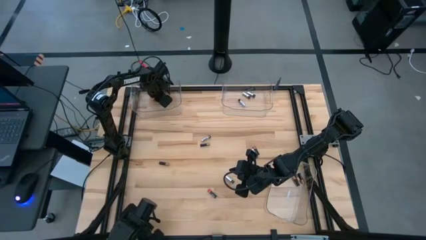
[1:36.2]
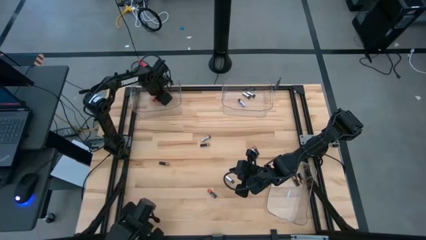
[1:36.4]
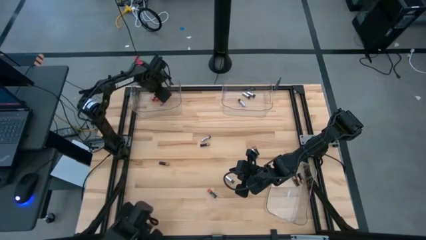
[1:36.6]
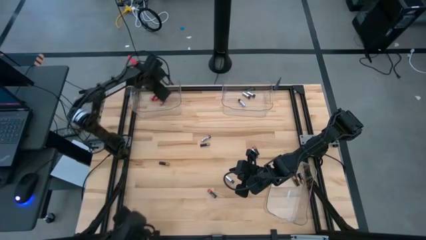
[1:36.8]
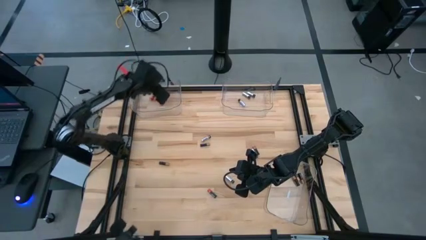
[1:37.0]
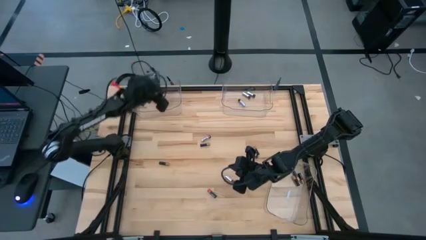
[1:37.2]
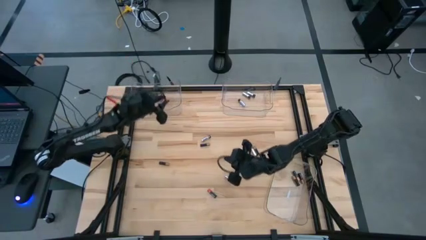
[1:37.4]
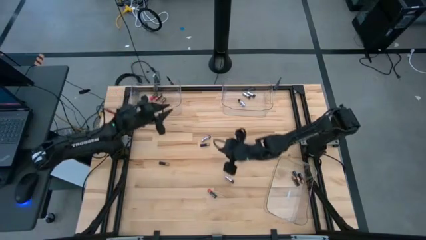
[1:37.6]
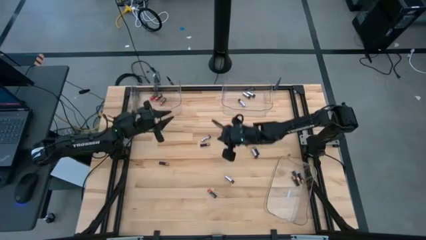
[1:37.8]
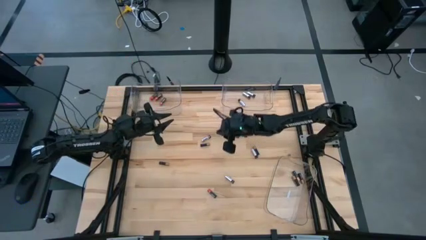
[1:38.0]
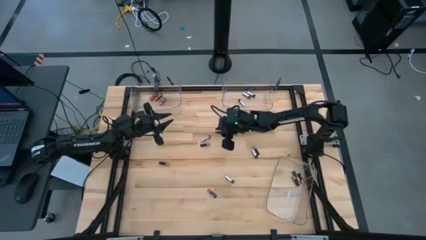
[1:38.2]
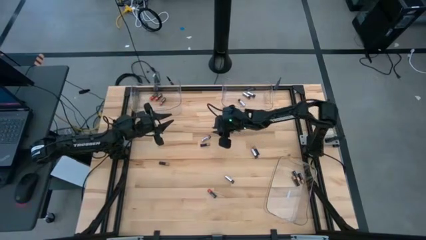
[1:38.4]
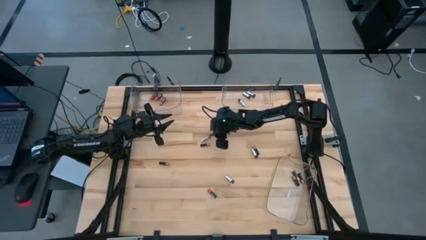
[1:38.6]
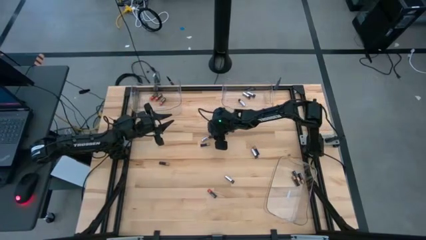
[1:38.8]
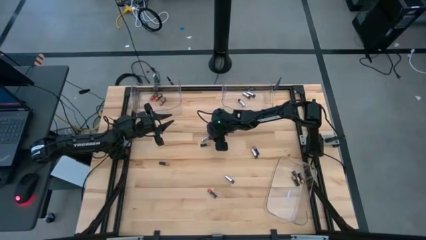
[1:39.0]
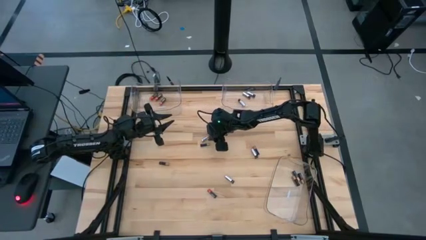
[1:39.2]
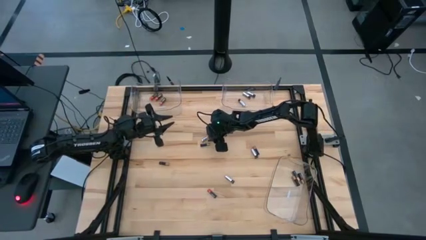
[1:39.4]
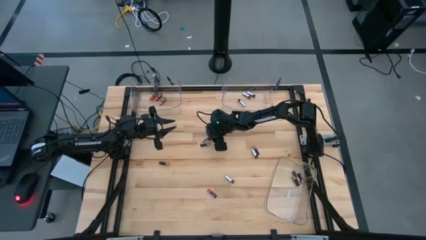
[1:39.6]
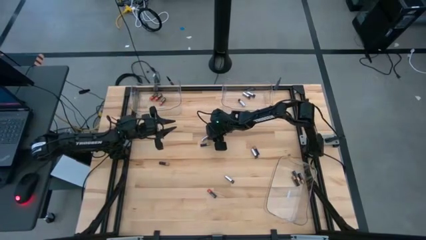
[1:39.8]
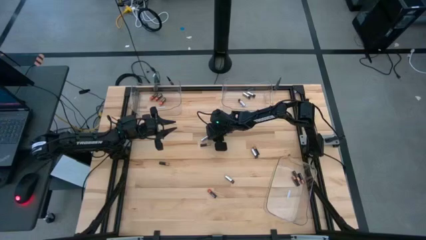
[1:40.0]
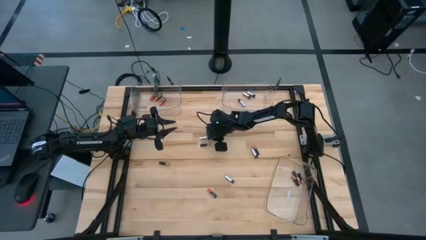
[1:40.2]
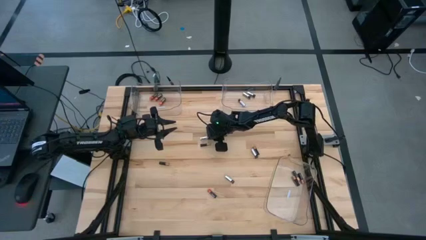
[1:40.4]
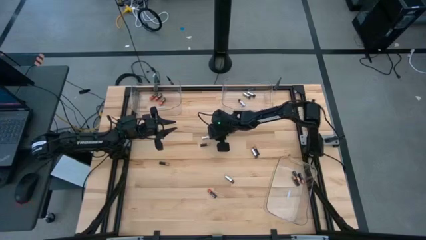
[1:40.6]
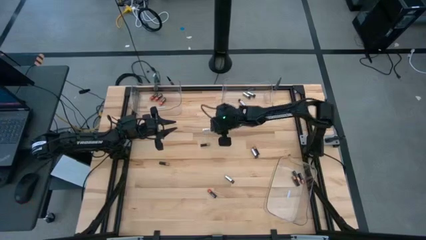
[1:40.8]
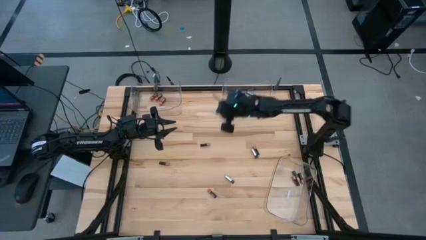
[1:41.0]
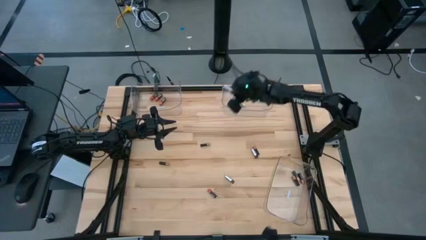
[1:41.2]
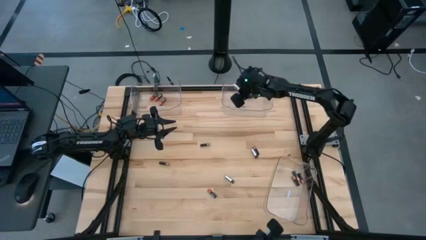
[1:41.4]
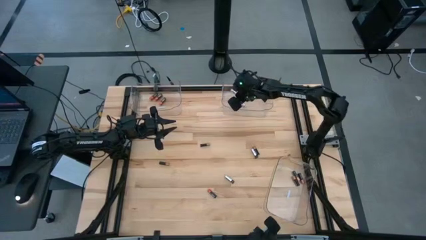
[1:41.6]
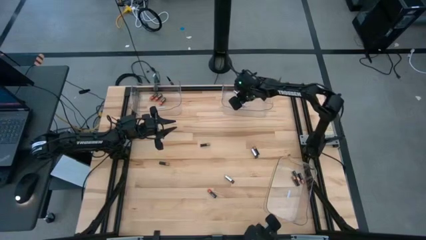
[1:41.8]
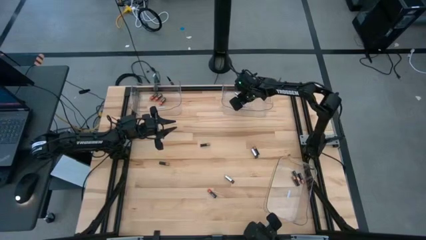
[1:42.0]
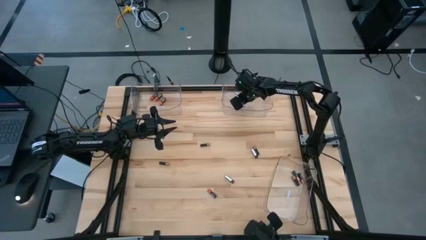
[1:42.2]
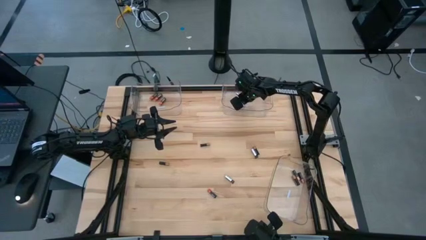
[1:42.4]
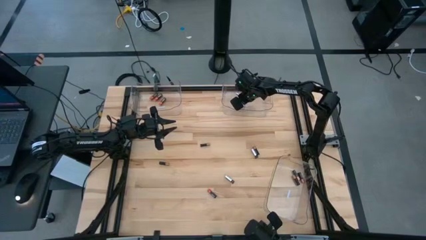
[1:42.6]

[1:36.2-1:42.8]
Task: Sort batteries
Put the silver battery into the top right transparent bin

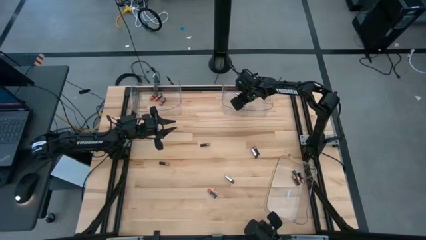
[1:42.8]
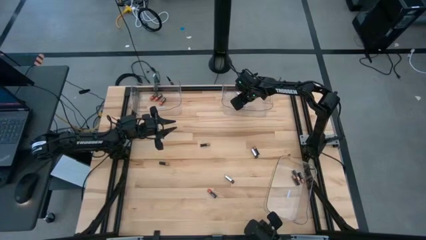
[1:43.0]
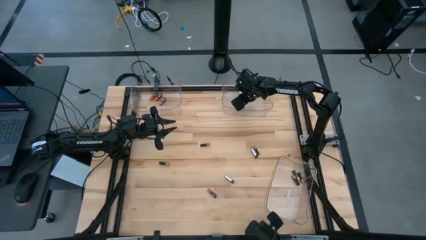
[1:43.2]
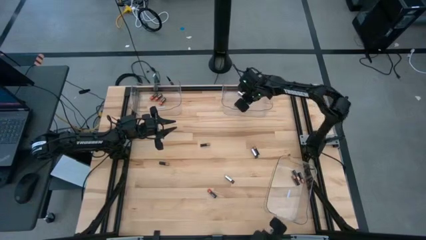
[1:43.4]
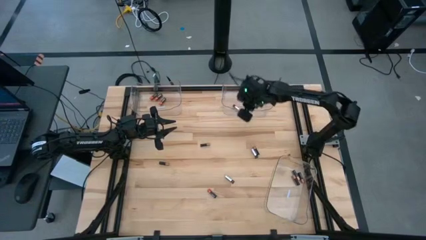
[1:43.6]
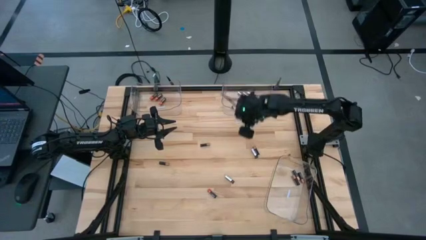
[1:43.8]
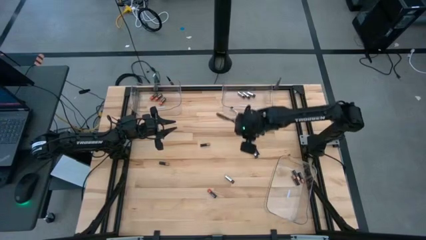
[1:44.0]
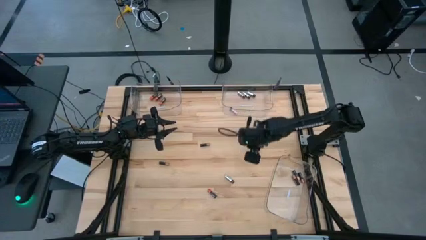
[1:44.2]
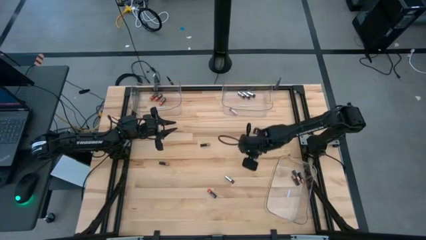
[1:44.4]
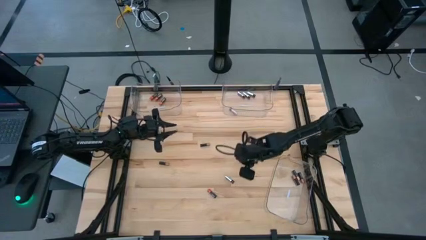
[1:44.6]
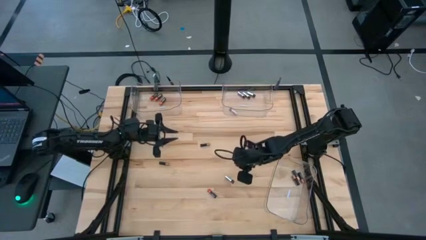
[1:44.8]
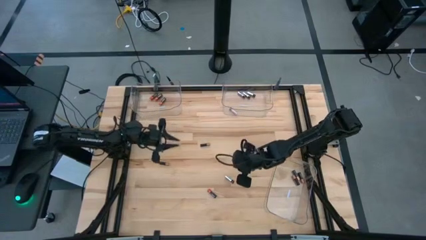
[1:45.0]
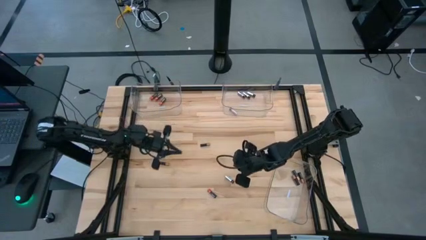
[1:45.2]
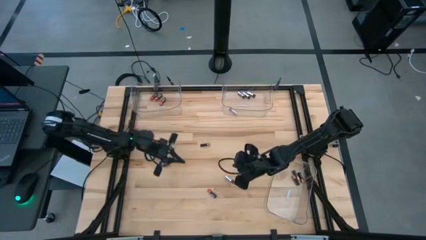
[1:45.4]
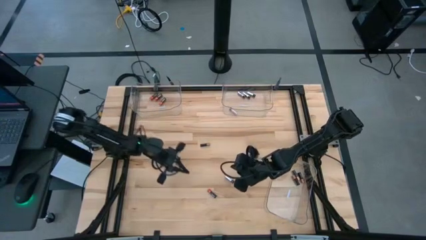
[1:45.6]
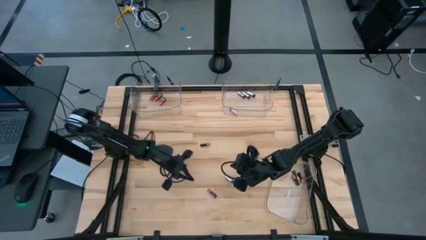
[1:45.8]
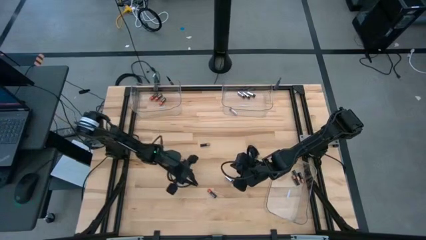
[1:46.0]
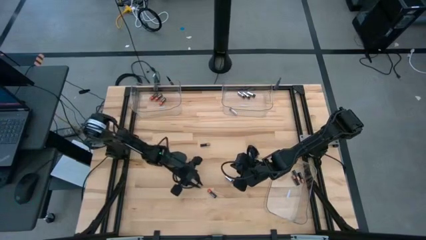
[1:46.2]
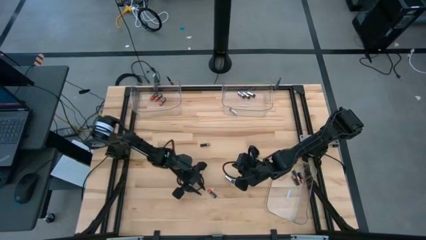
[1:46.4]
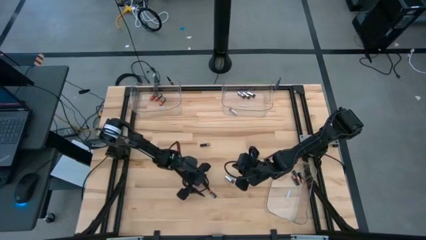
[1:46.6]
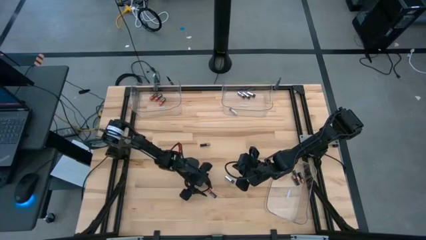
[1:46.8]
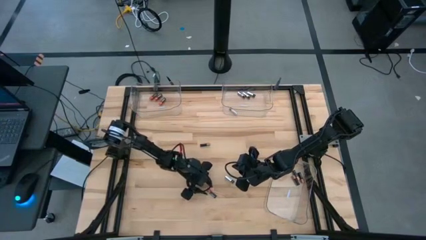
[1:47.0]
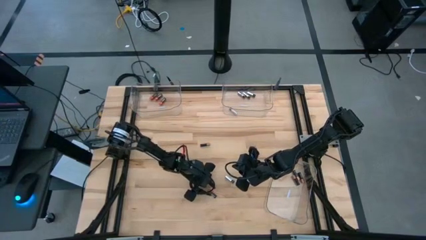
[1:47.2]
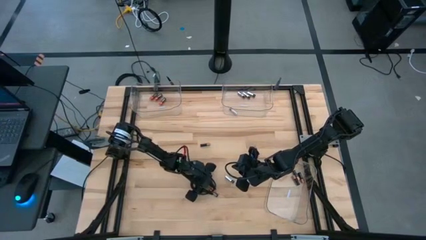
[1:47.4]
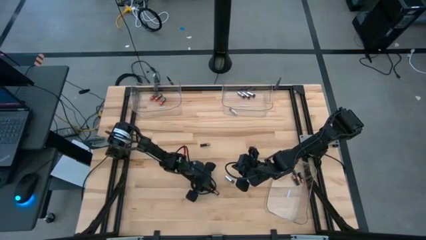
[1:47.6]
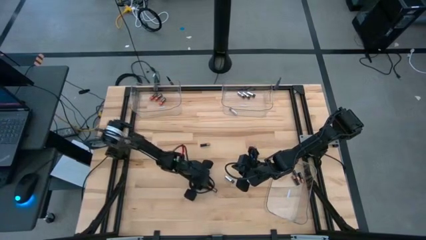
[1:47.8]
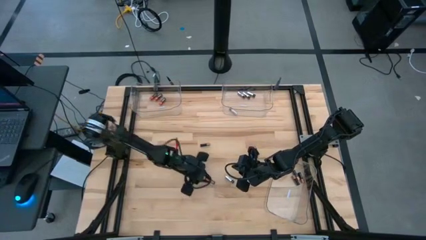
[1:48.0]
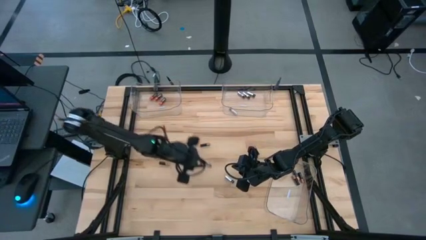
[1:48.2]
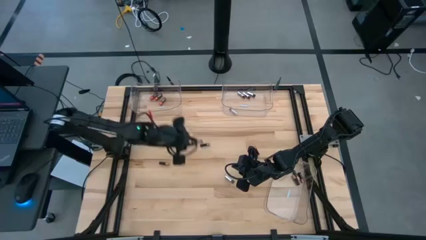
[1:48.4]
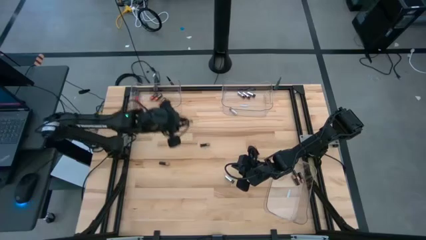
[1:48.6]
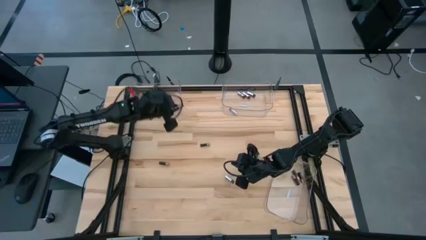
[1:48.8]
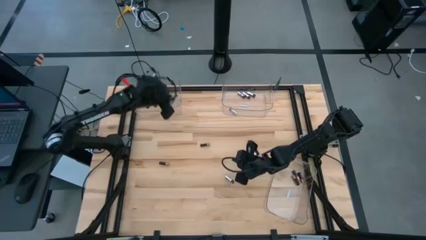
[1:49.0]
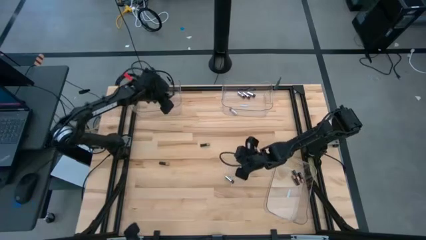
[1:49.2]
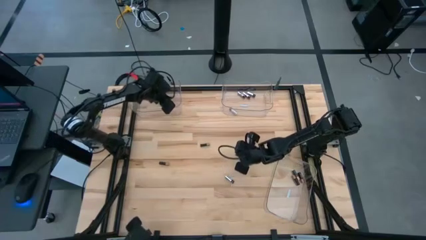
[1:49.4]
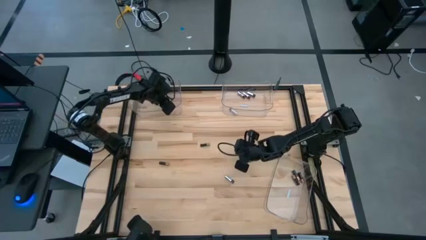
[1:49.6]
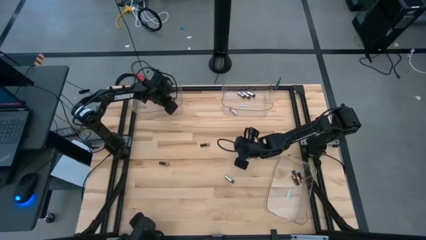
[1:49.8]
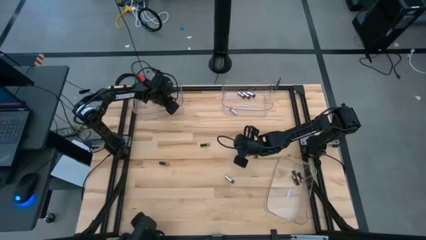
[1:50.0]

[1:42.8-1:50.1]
Put the red battery into the top left transparent bin

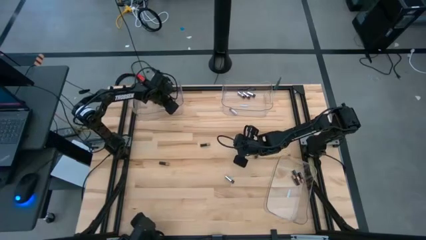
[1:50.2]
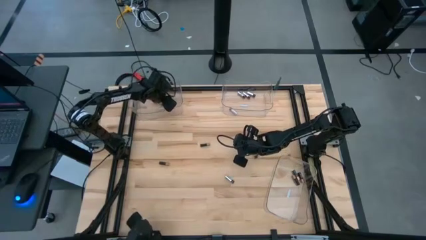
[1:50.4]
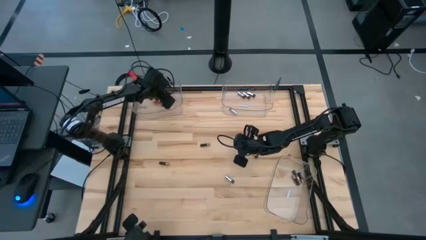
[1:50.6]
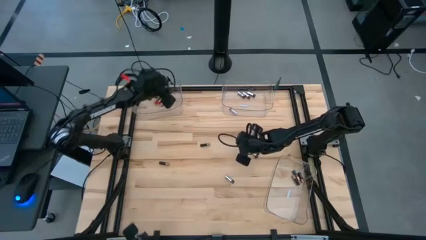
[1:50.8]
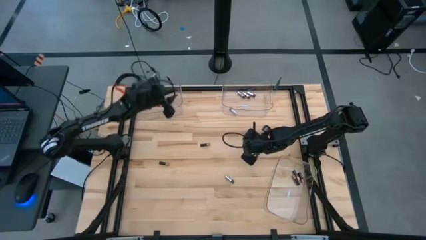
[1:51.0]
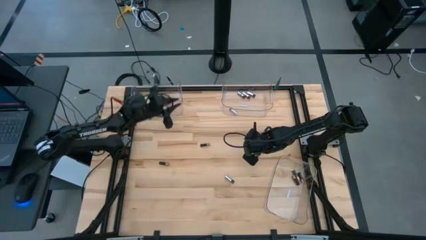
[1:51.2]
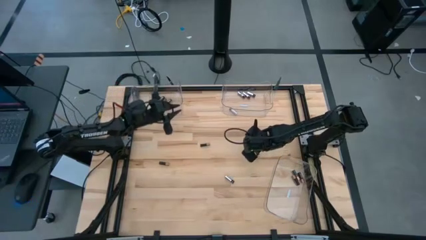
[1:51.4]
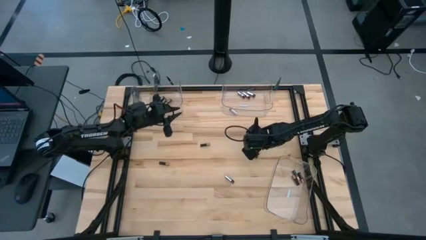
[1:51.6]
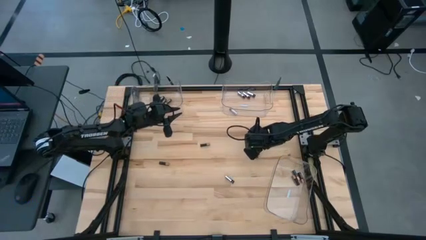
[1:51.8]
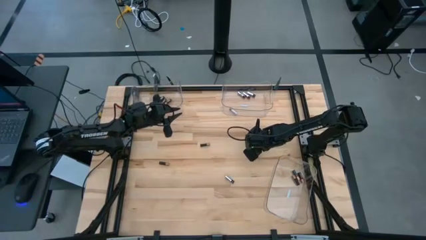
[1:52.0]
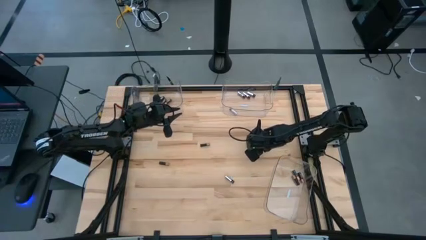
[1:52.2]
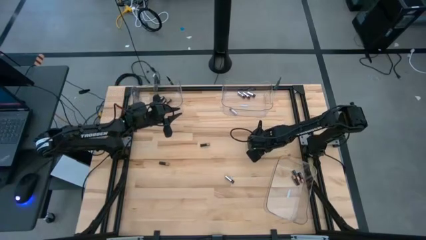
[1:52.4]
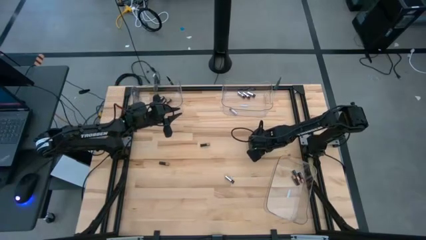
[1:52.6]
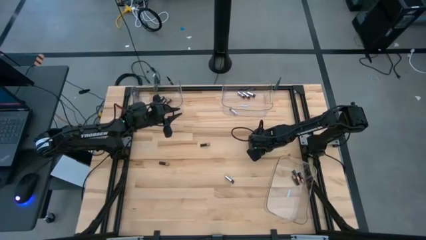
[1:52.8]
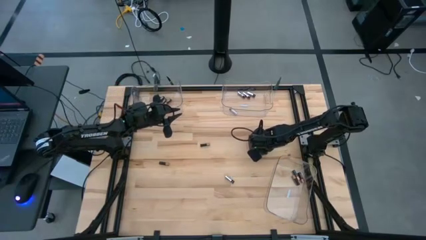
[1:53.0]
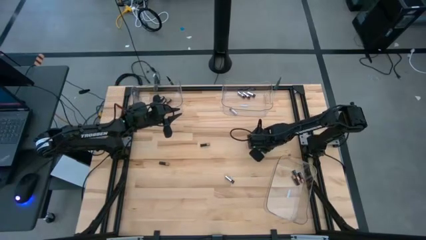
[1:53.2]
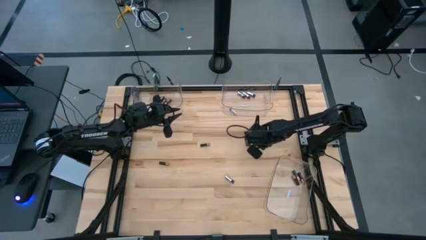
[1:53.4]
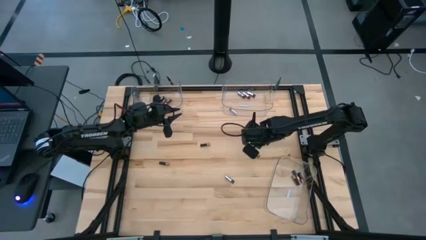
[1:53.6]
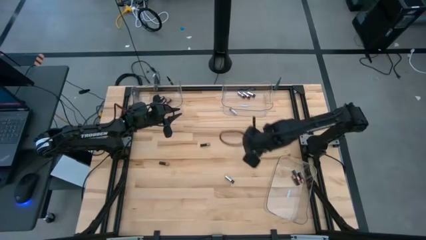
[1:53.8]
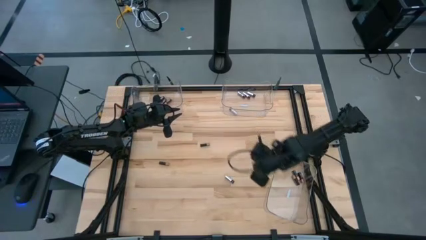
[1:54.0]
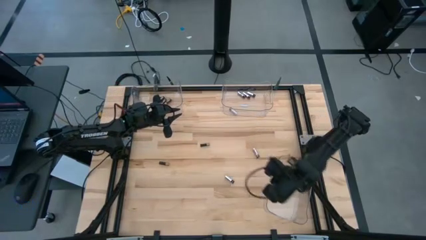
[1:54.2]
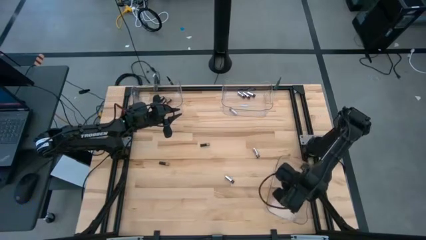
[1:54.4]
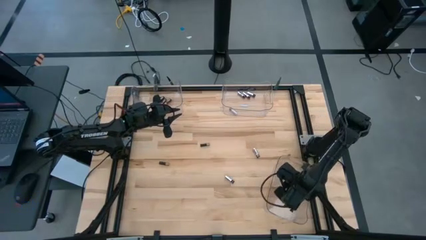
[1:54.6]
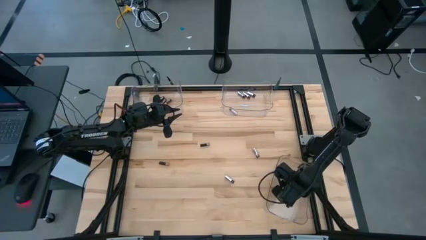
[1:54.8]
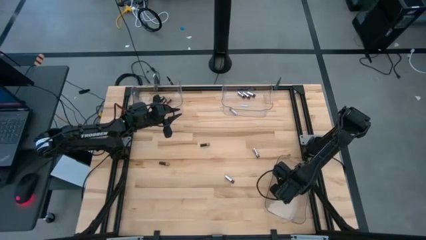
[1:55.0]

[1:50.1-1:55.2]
Put the brown battery into the bottom right transparent bin
